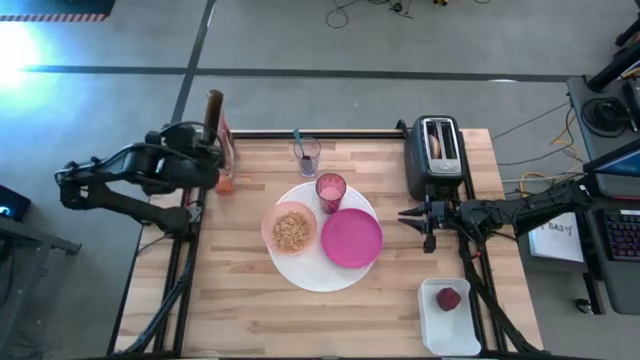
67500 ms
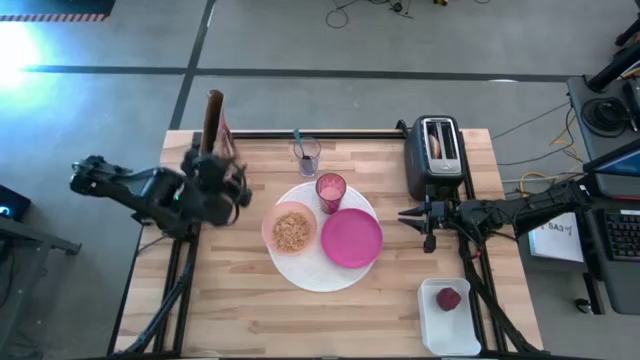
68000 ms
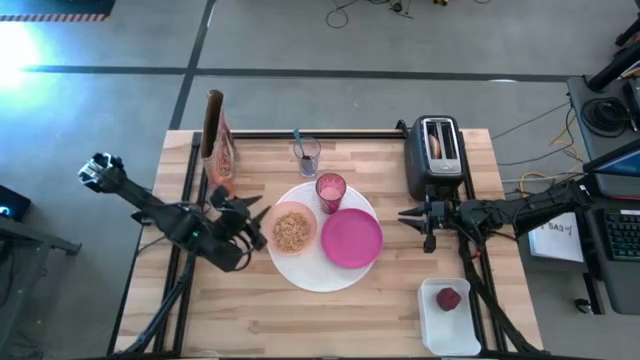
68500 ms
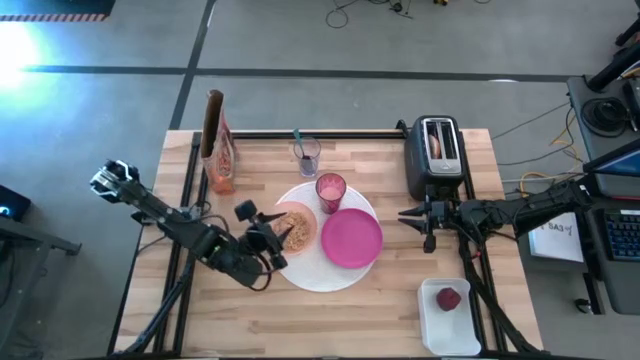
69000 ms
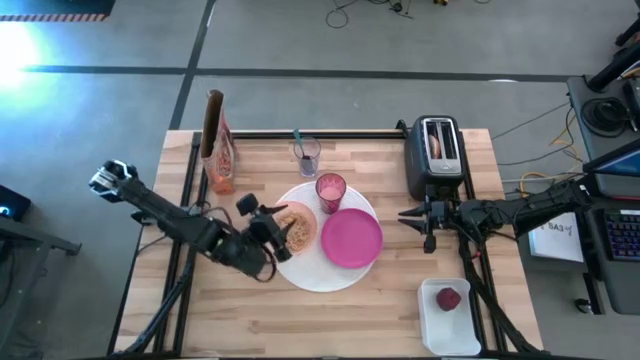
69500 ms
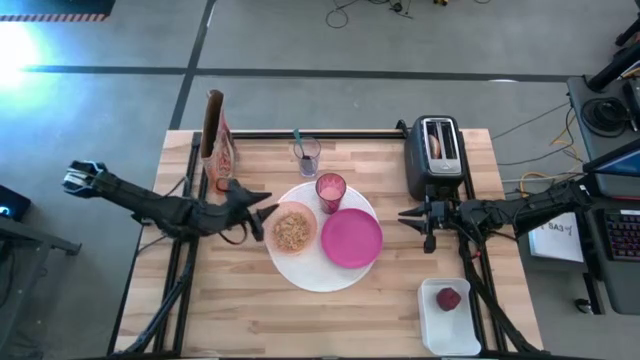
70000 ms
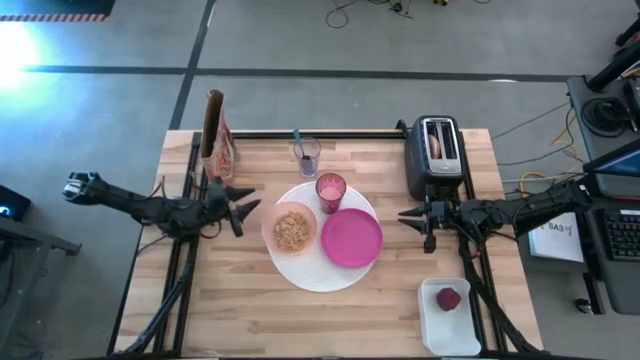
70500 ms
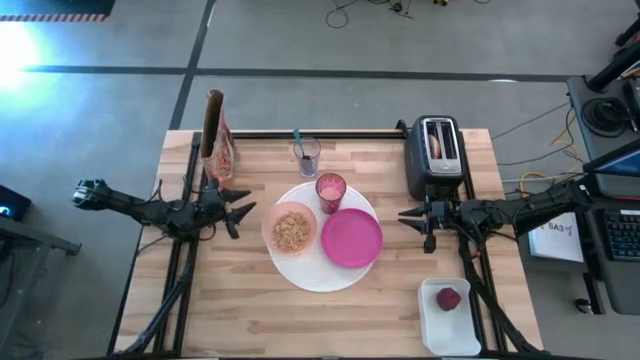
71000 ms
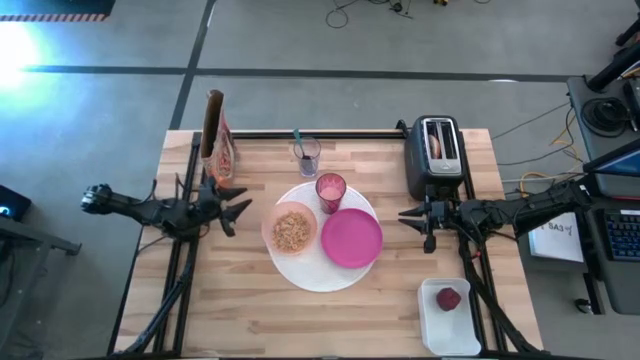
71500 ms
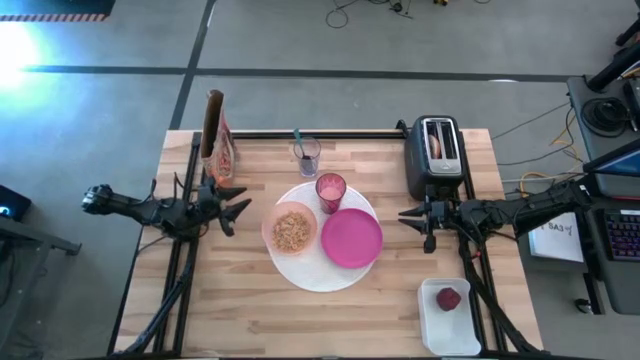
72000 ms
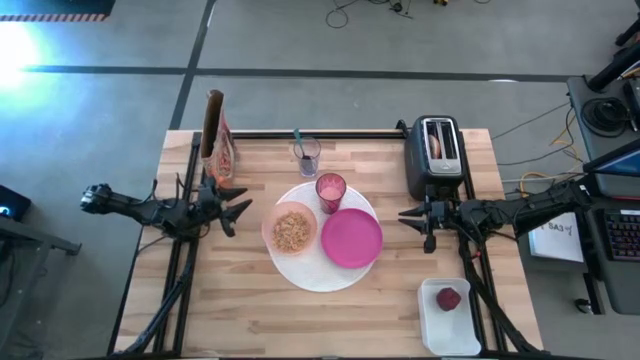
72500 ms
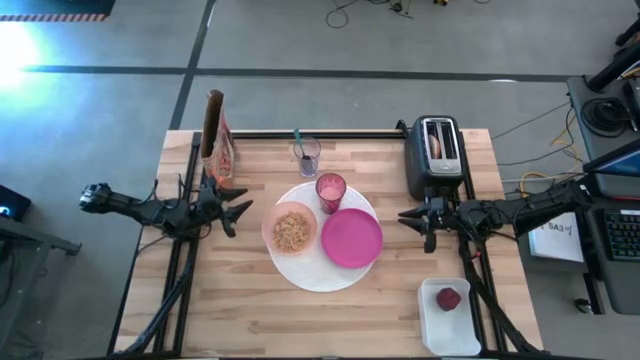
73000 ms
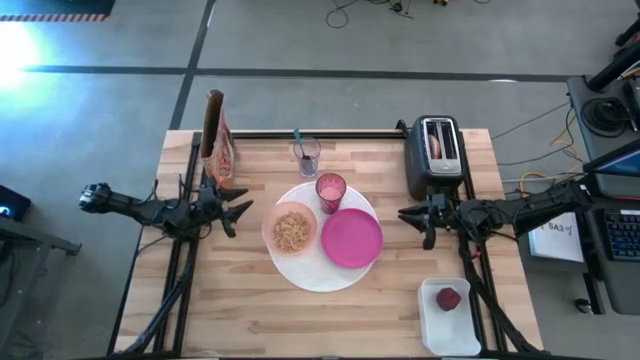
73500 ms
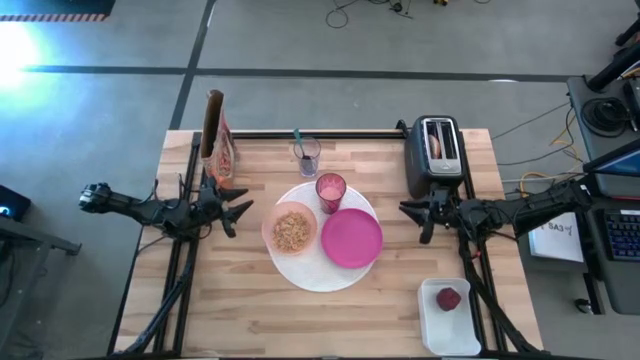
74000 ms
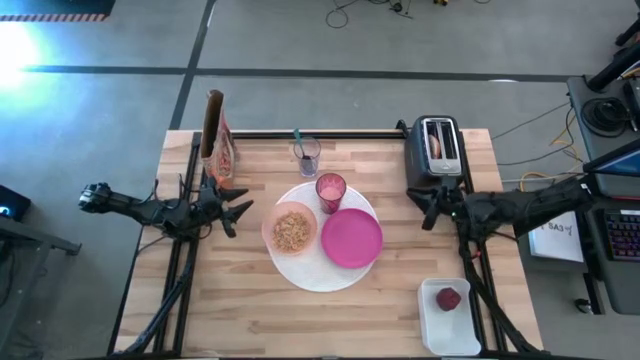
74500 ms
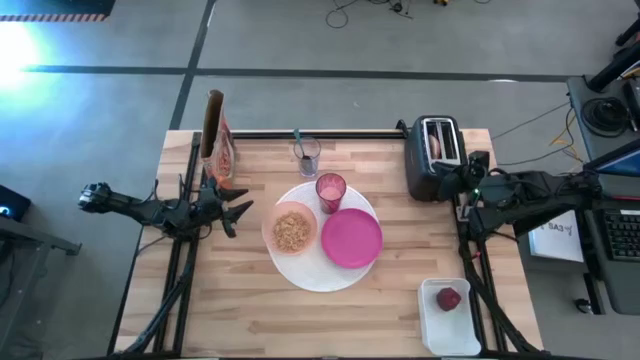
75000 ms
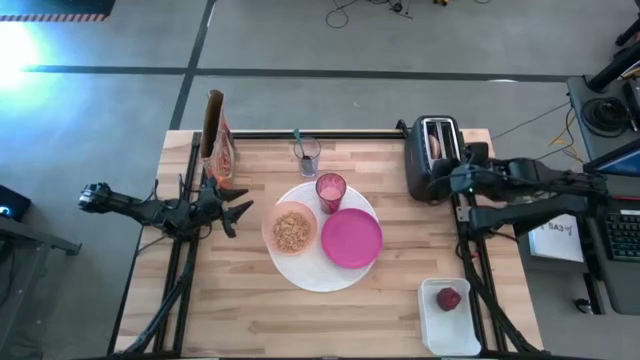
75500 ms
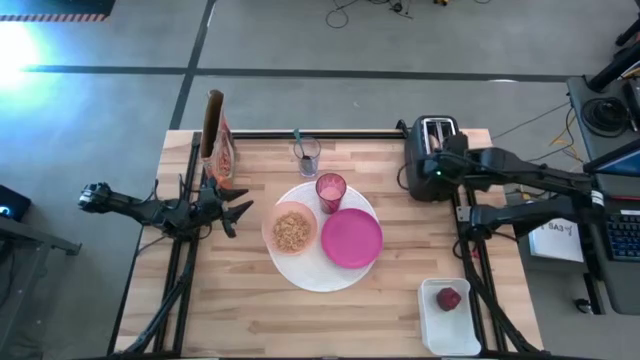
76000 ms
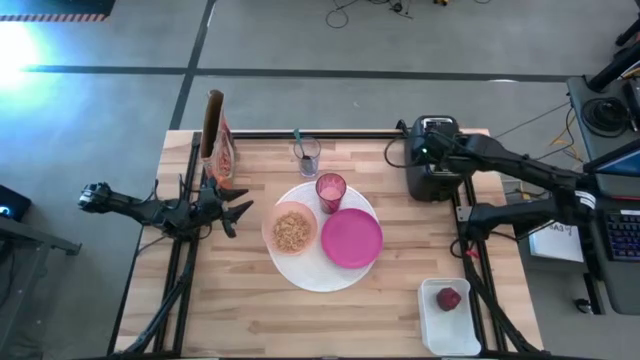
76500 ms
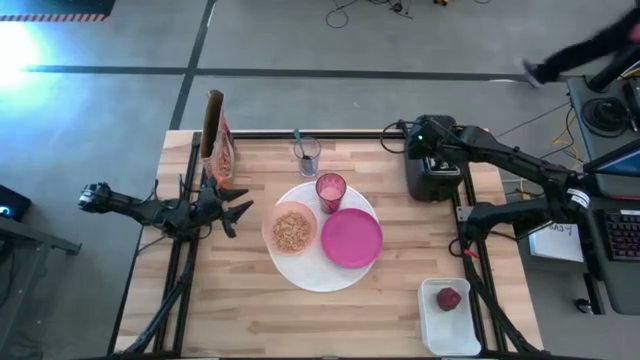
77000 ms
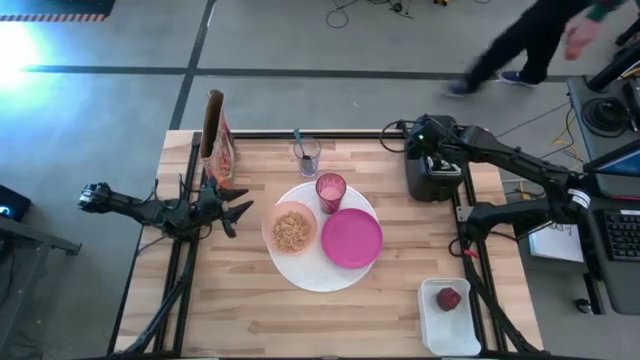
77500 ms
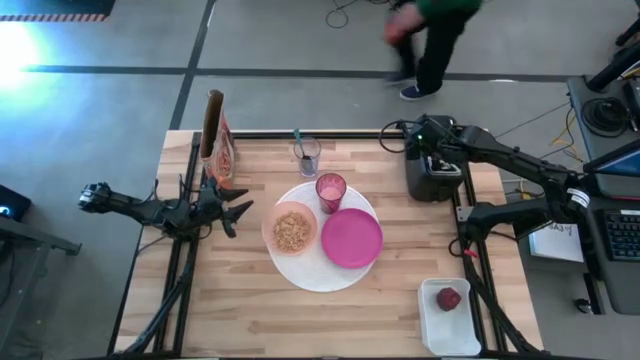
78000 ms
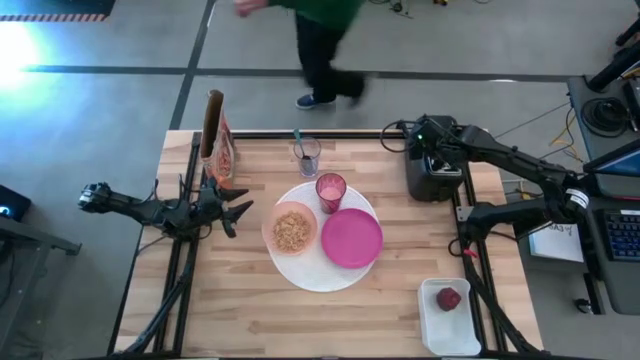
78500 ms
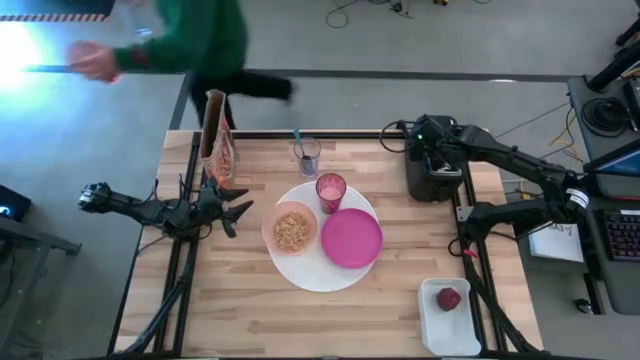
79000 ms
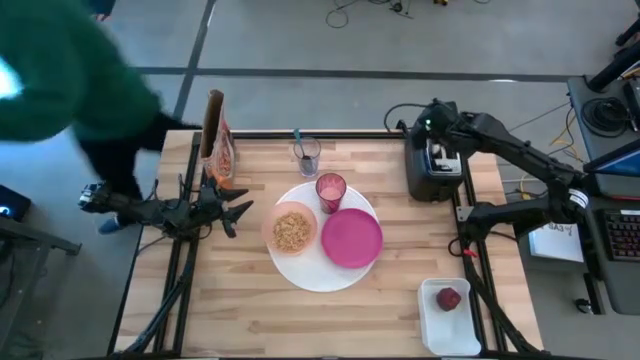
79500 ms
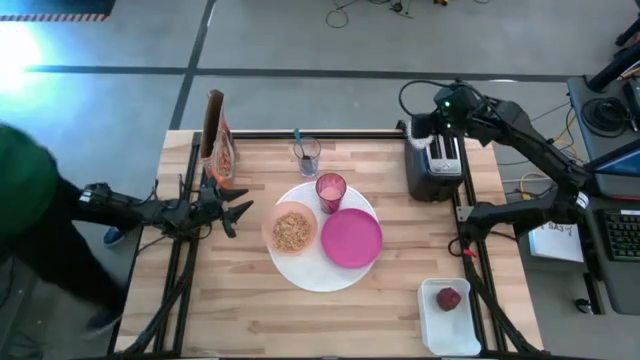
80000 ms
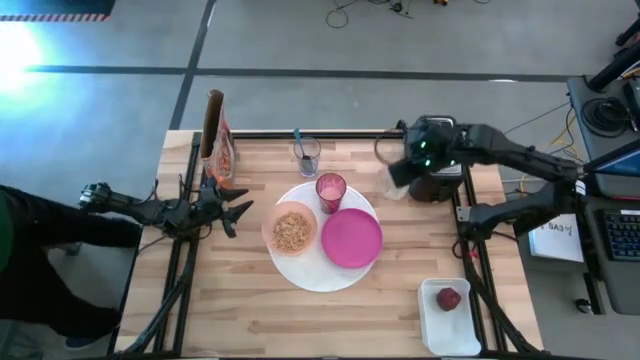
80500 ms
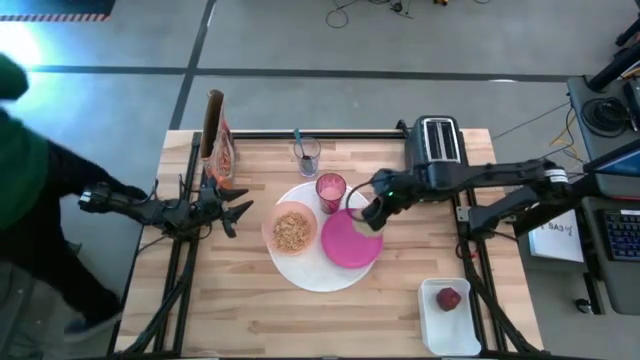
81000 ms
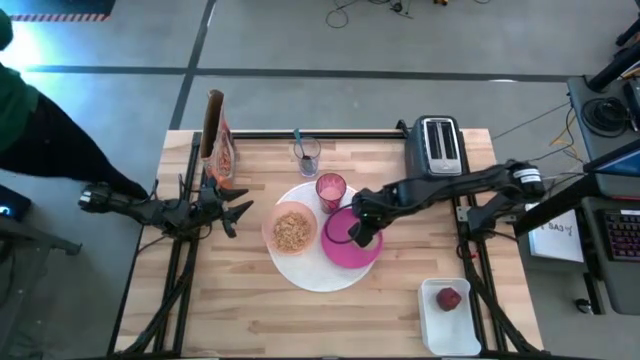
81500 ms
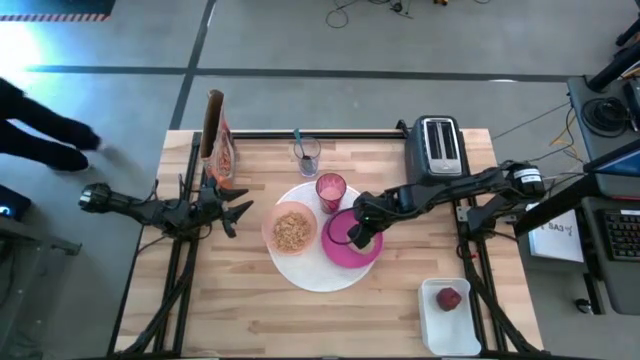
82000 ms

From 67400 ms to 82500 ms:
Task: Arrange a breakfast setting
Put the bagel on the pink plate

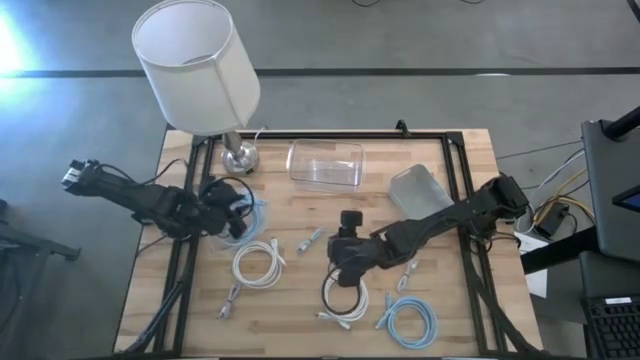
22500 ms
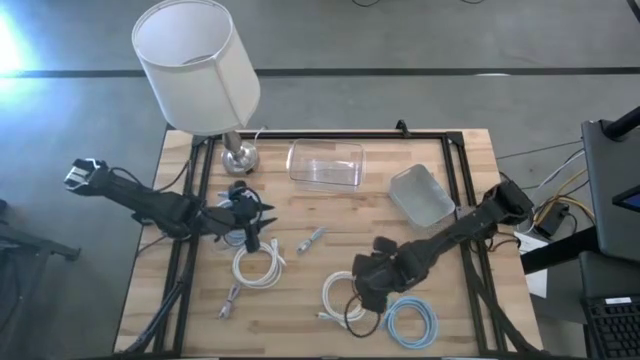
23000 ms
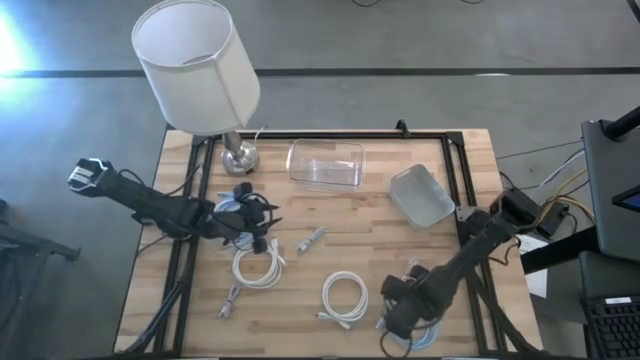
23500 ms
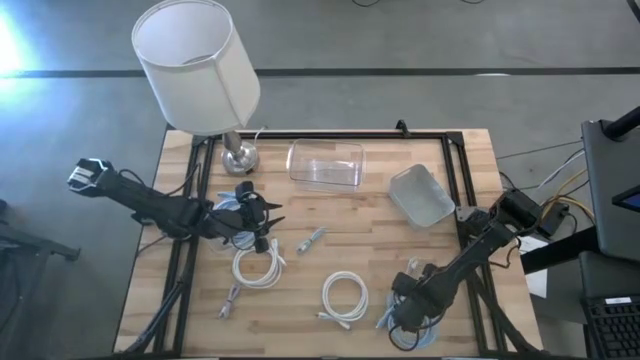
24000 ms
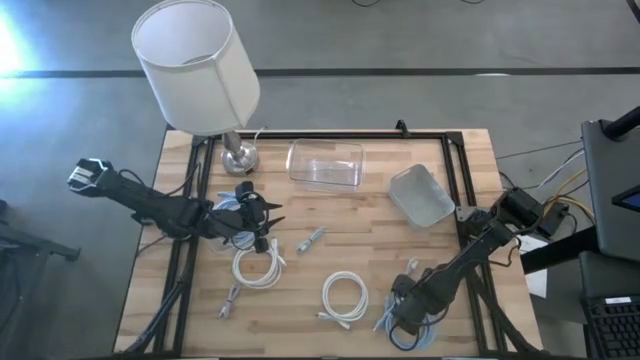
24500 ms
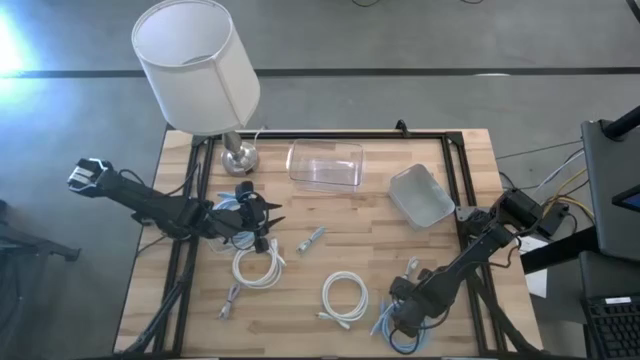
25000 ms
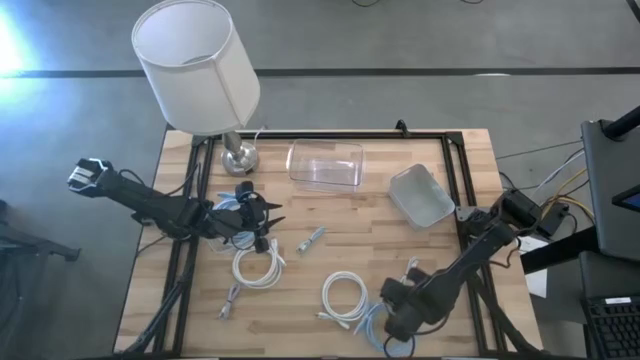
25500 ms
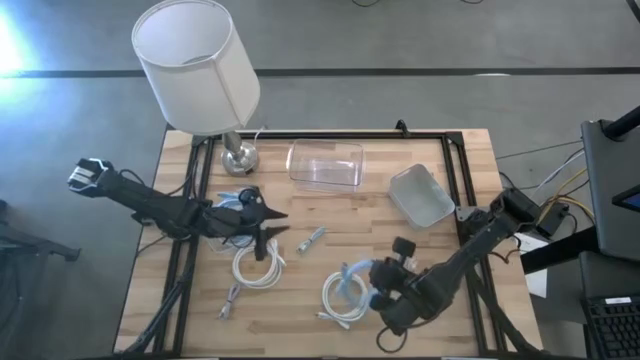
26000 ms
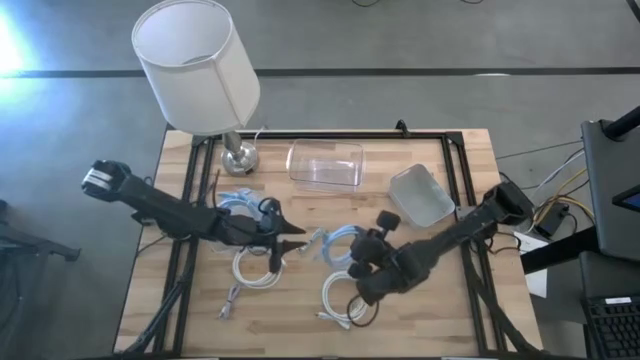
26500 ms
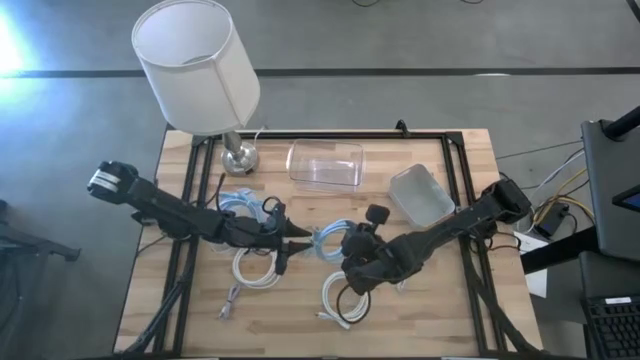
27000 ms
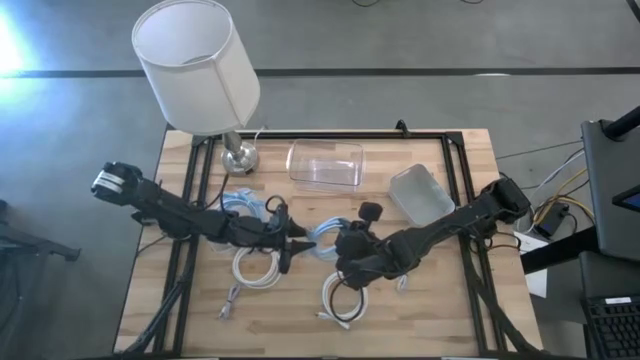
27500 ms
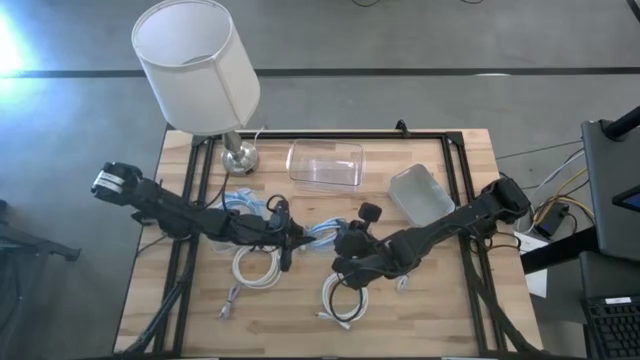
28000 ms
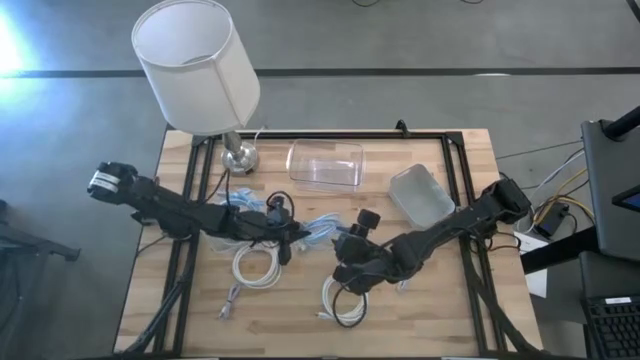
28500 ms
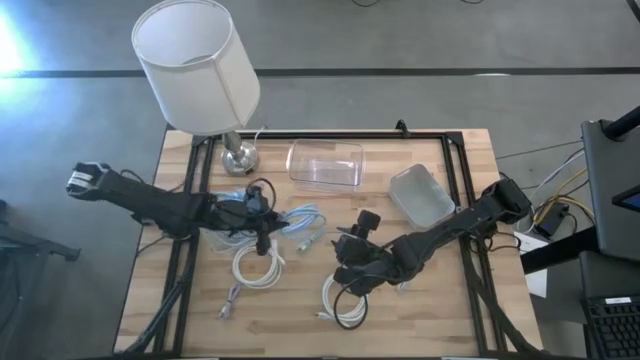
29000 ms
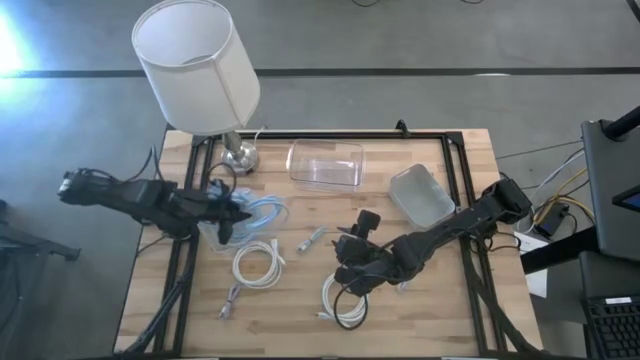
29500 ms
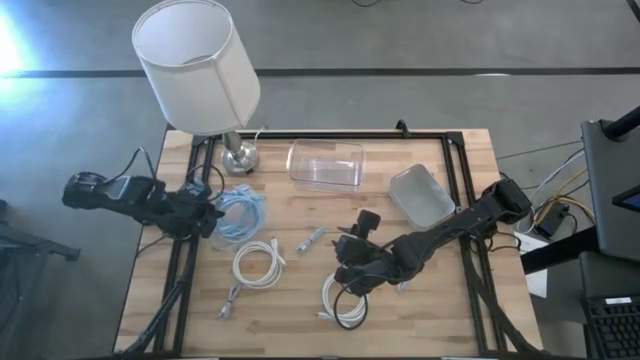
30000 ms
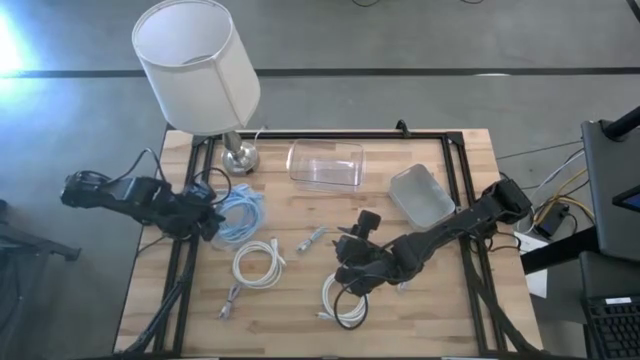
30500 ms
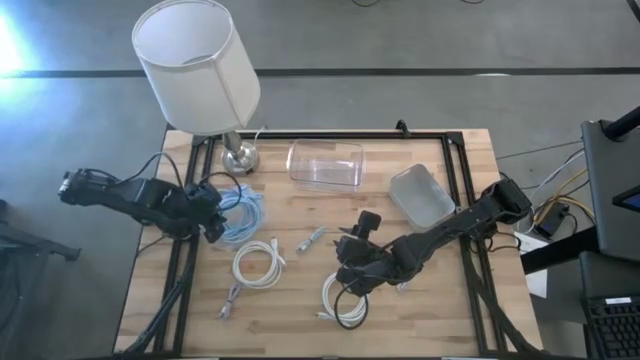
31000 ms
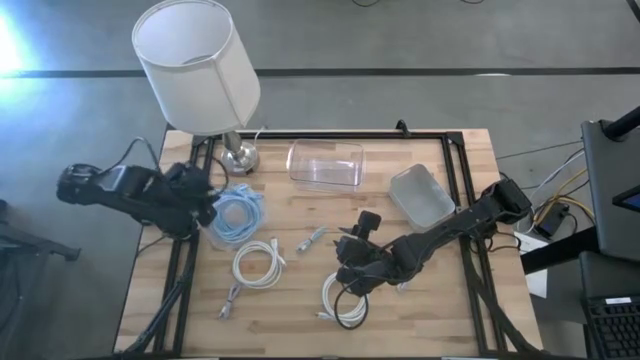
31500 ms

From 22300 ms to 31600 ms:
Task: Pick & Place USB Port
Put the light blue HDMI cable into the white bin
